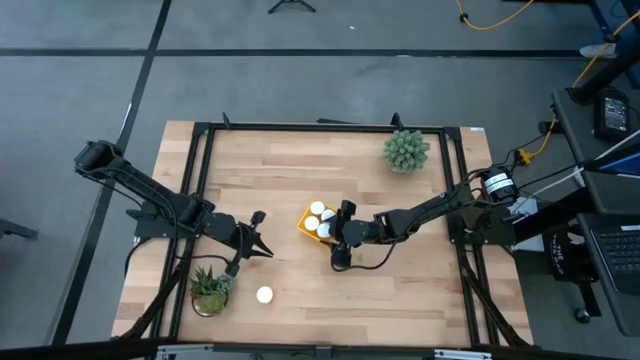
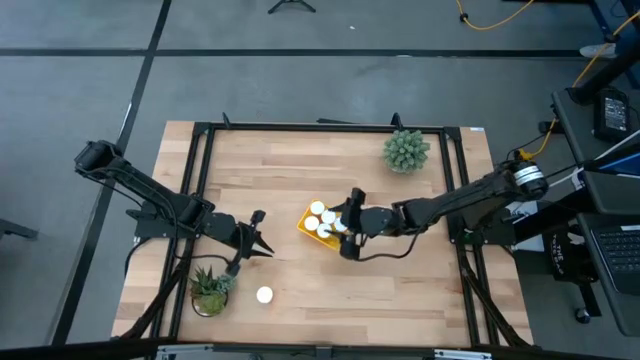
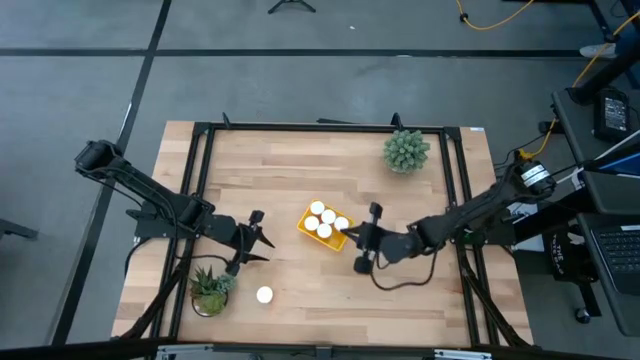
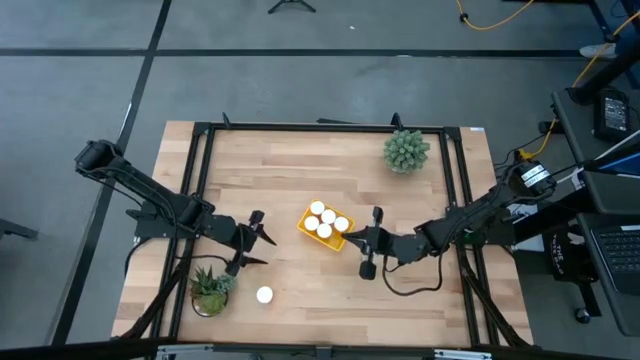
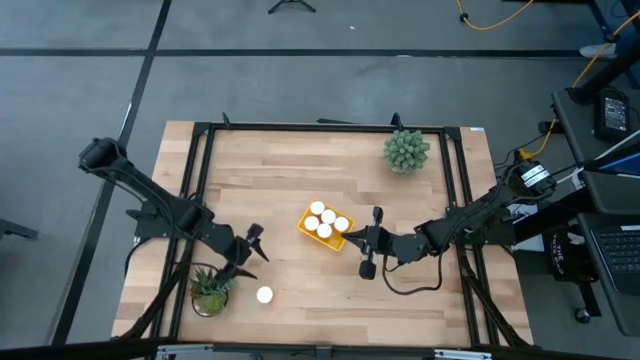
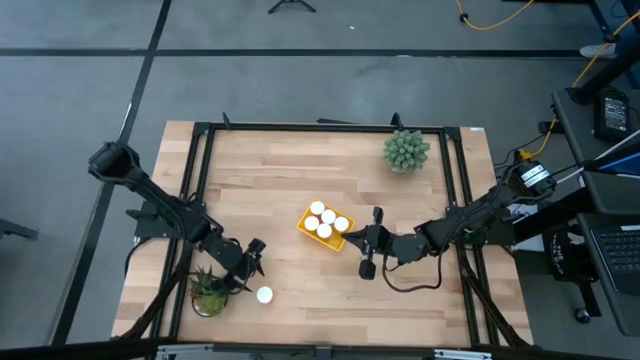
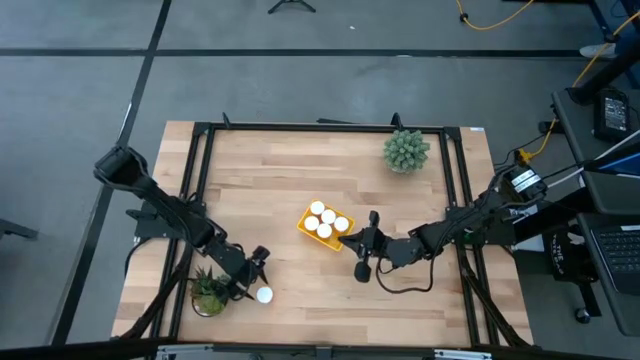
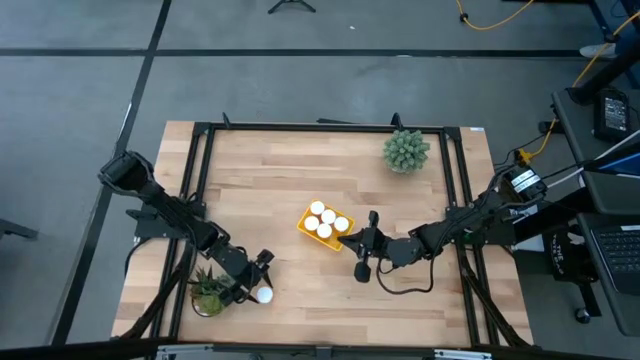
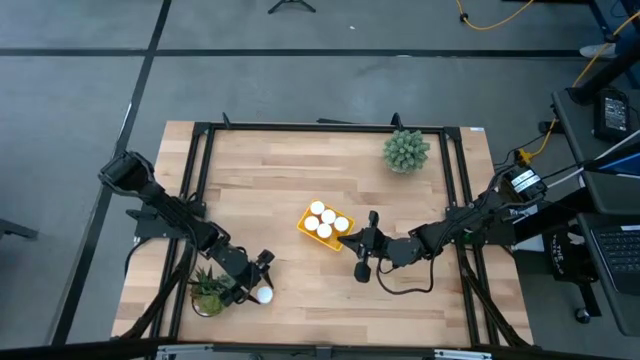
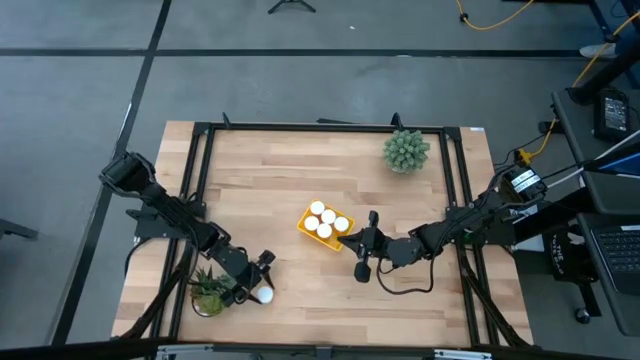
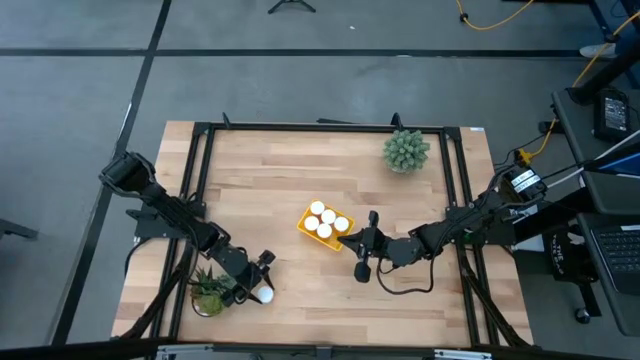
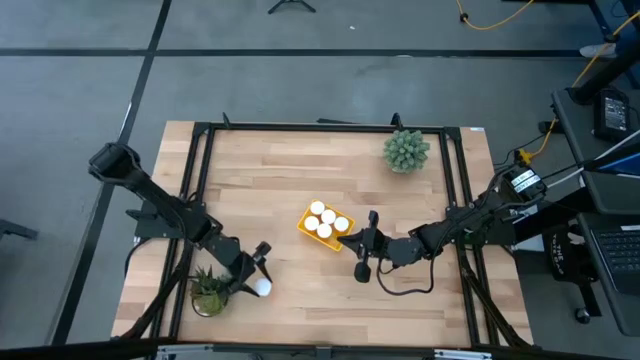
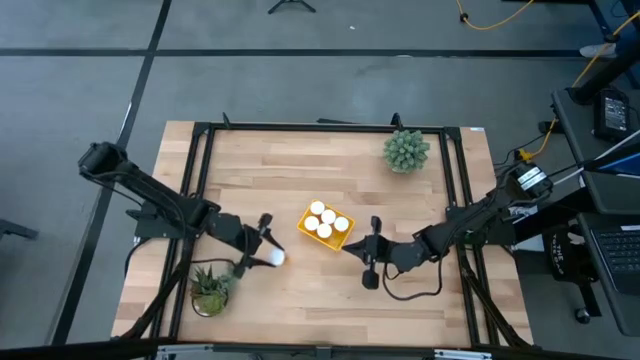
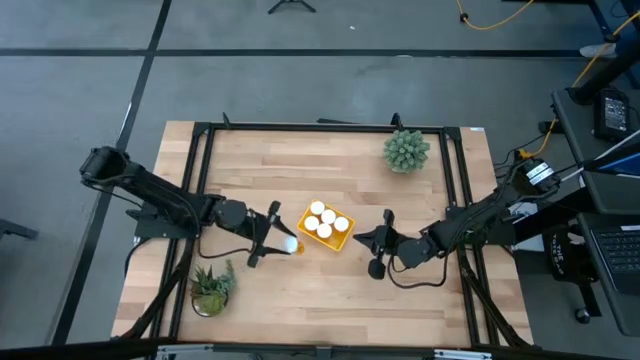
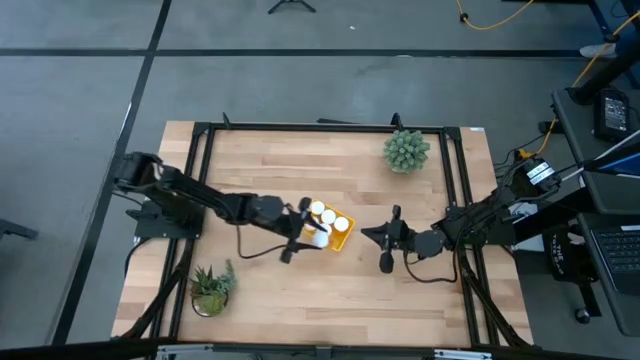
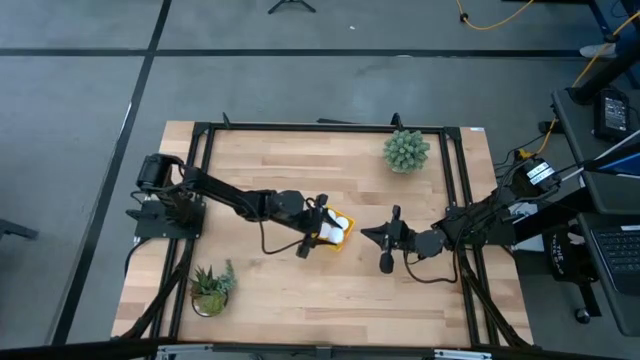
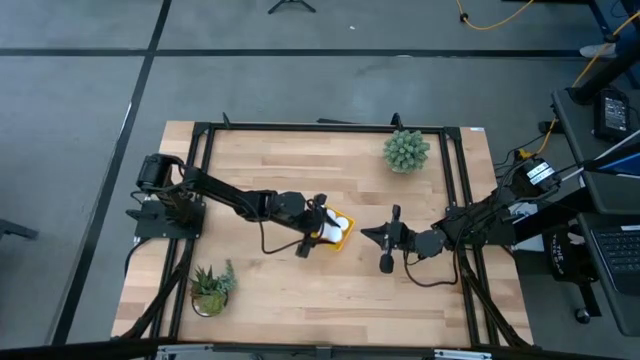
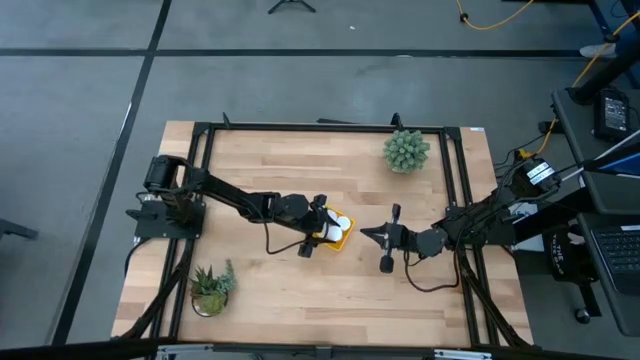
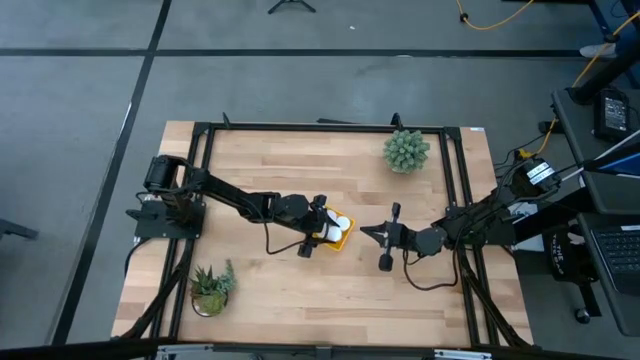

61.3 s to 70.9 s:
Task: Pick and place pill bottles into a basket
Put the orange pill bottle into the yellow bin

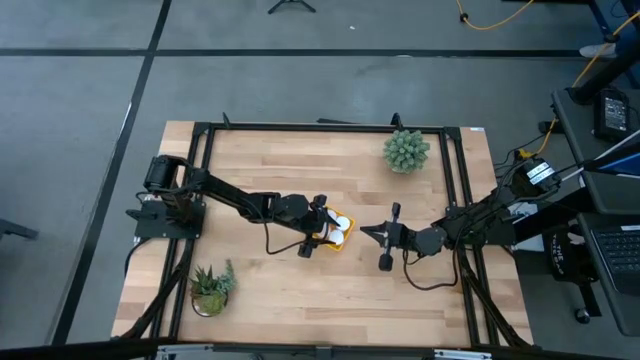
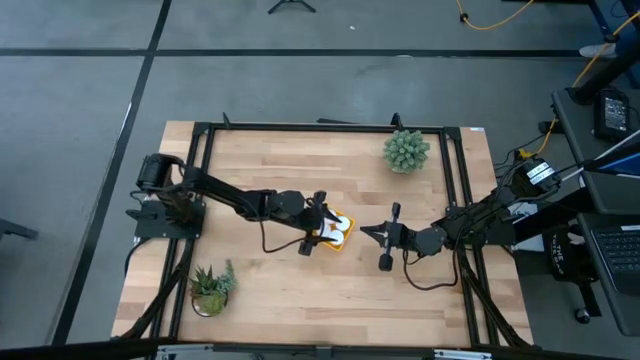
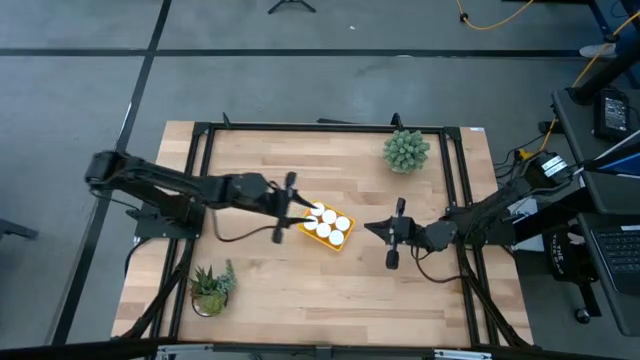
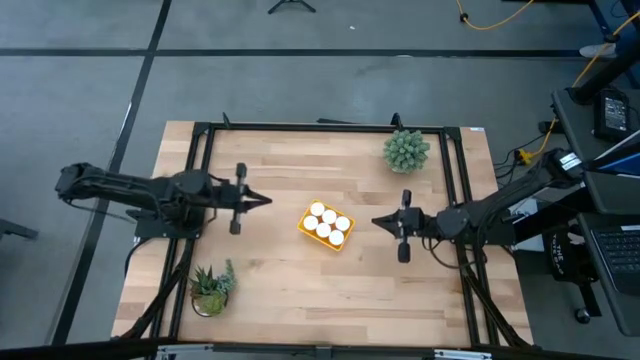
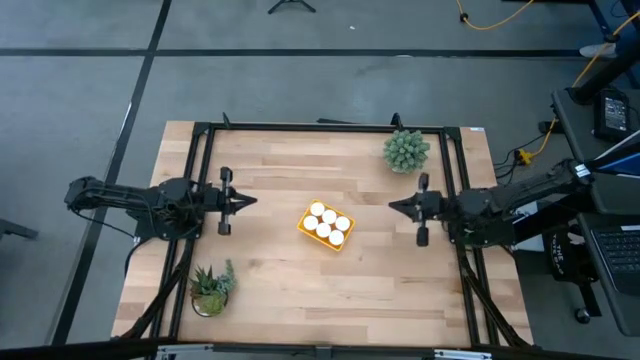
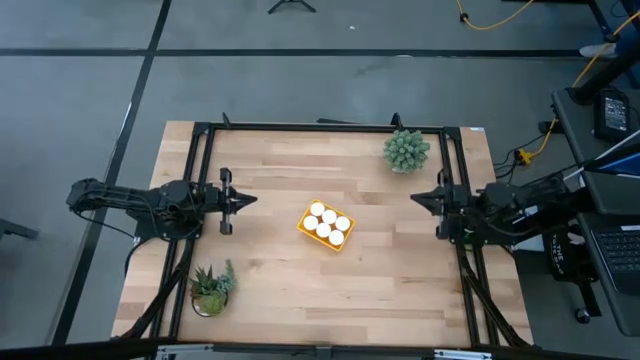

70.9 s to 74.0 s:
Return to Home Position

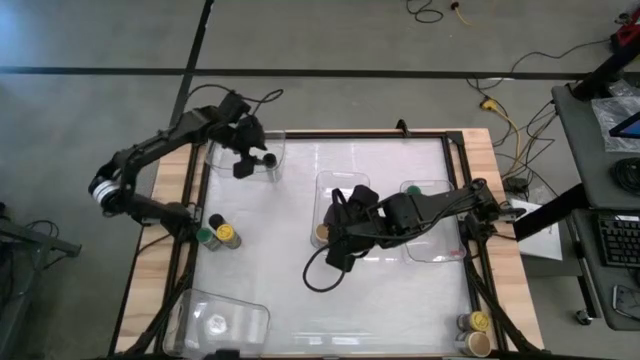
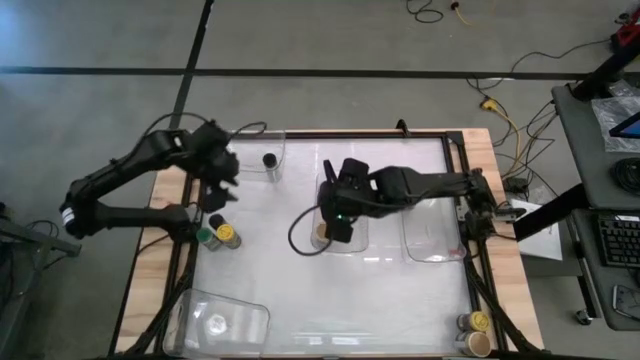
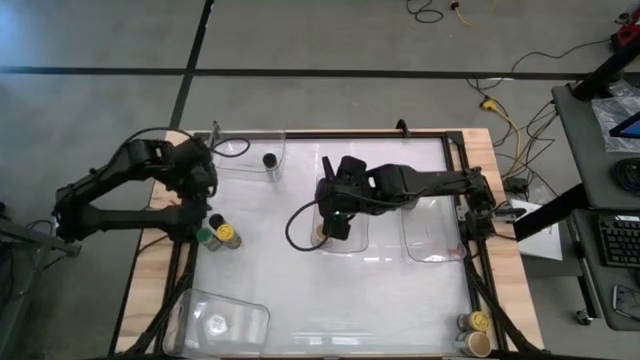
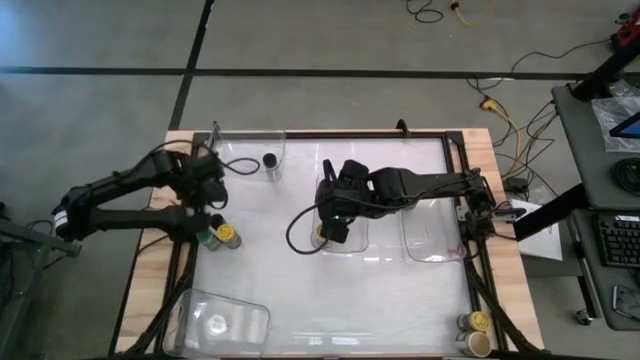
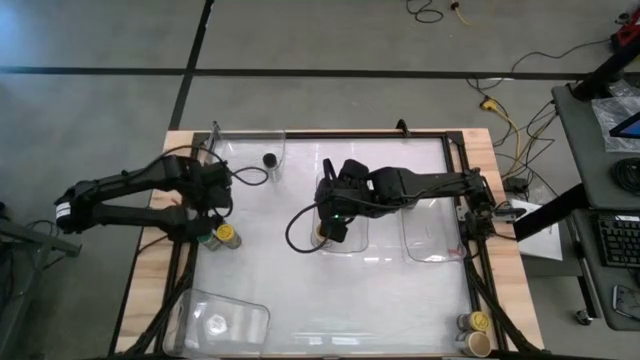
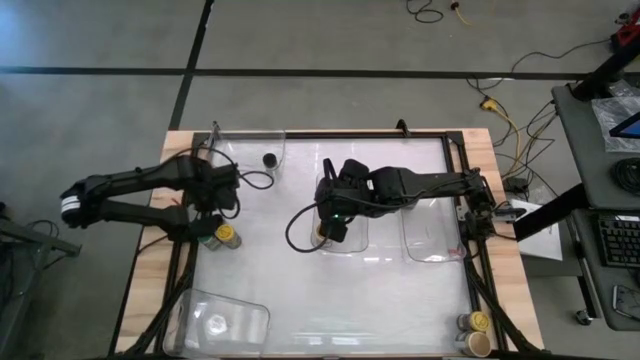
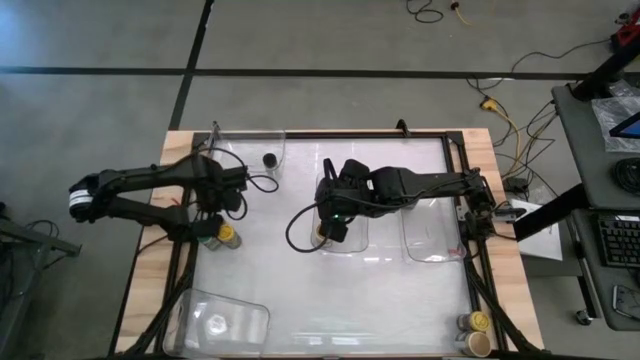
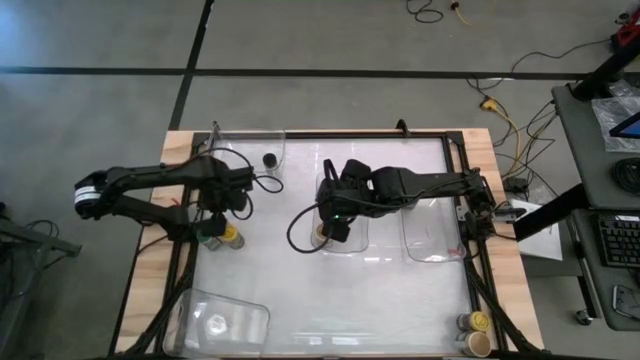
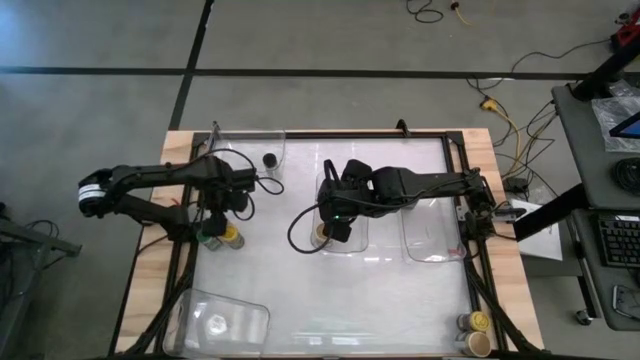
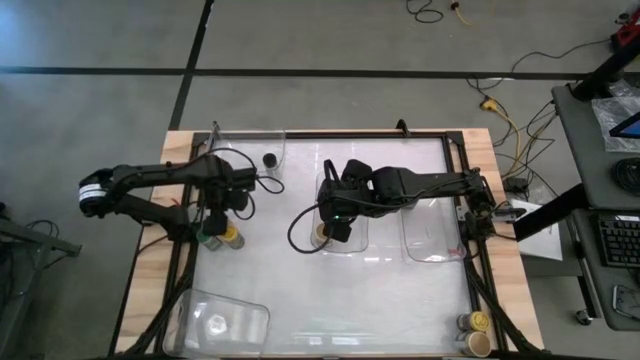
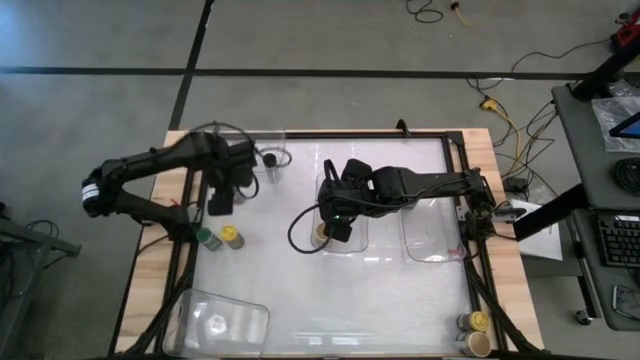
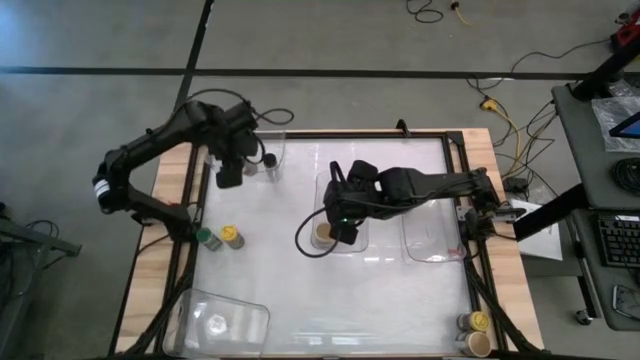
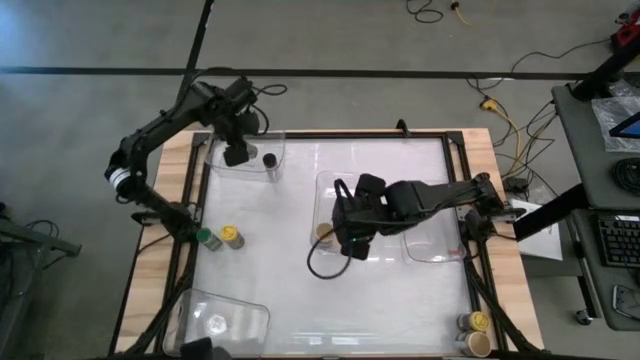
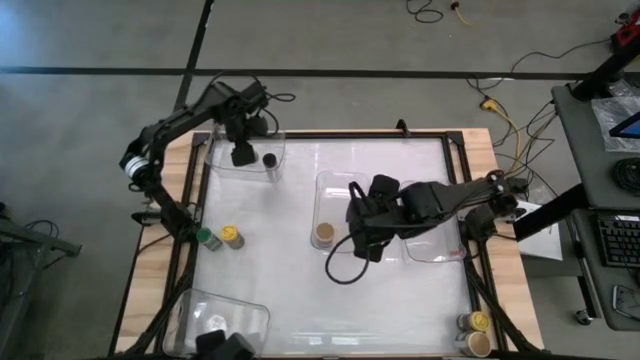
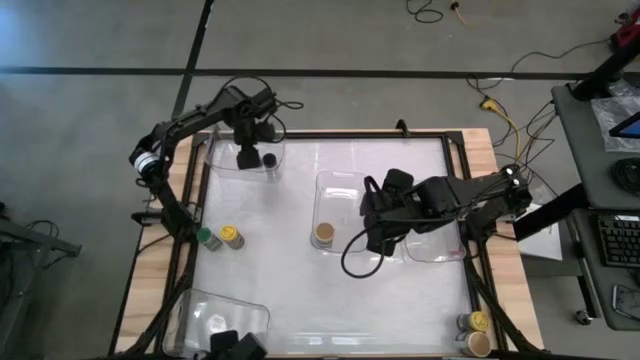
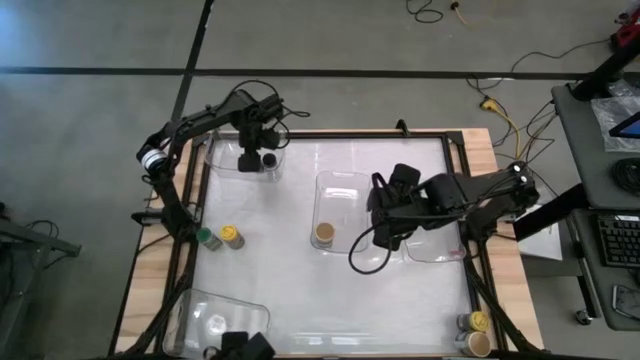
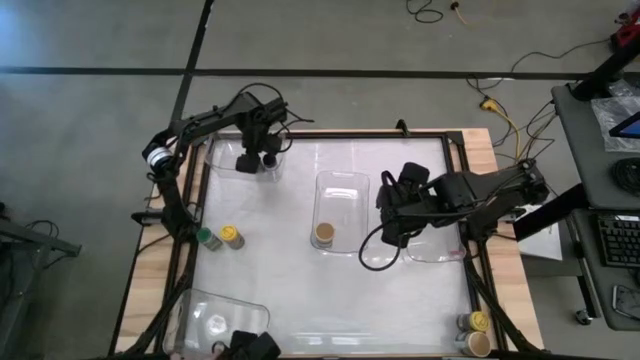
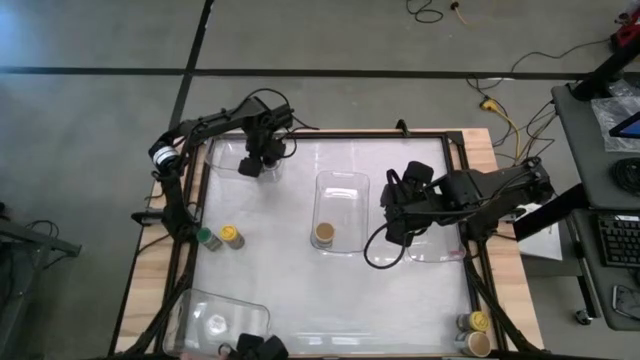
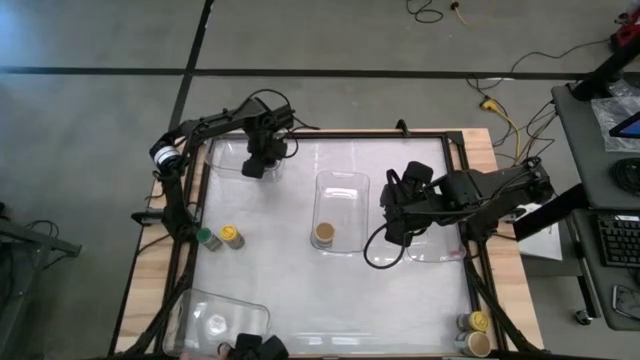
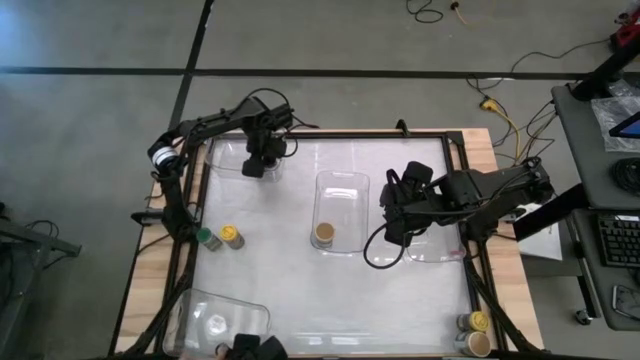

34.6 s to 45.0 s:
Task: Sort spices by type
Put the black seasoning bottle into the top left transparent bin
